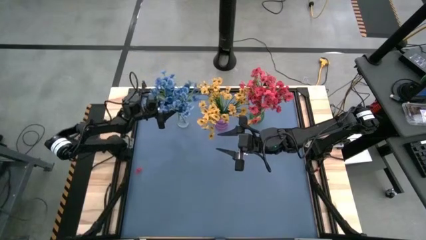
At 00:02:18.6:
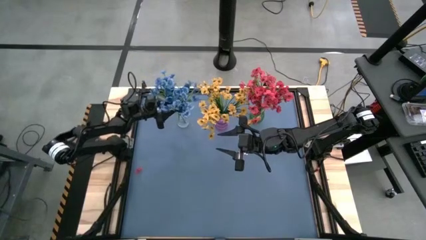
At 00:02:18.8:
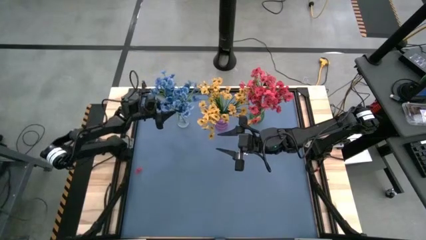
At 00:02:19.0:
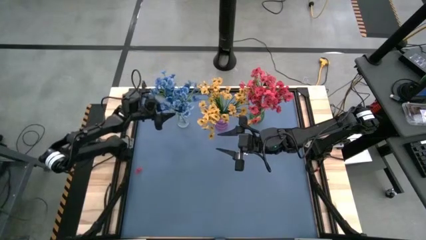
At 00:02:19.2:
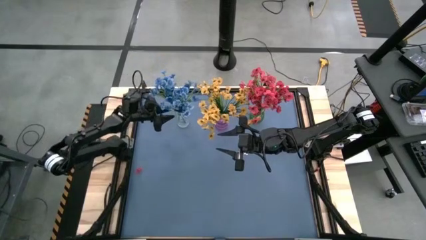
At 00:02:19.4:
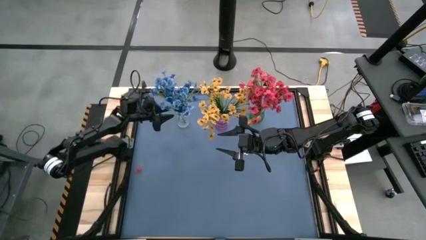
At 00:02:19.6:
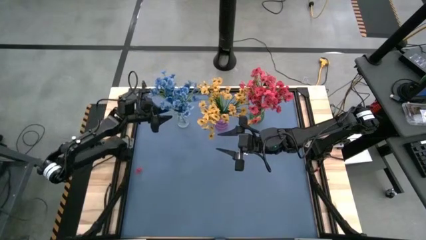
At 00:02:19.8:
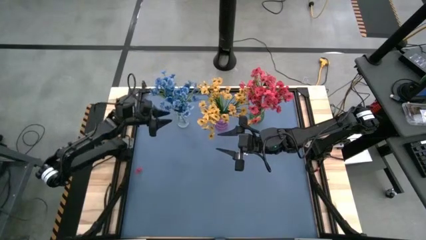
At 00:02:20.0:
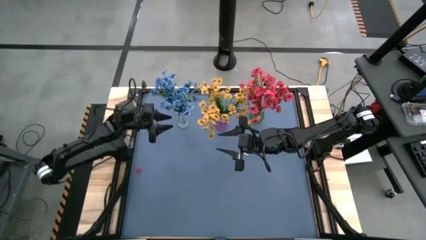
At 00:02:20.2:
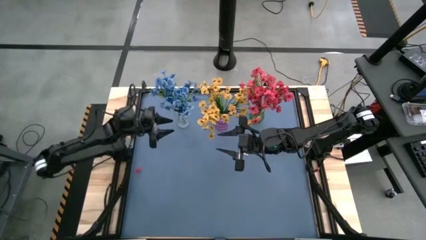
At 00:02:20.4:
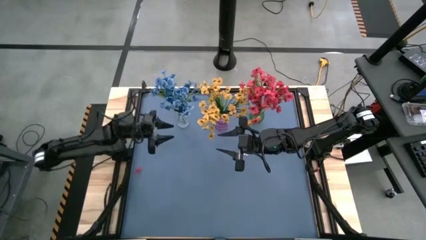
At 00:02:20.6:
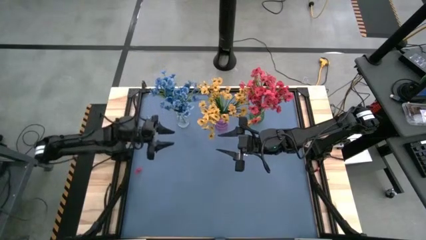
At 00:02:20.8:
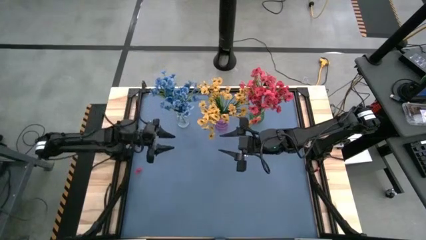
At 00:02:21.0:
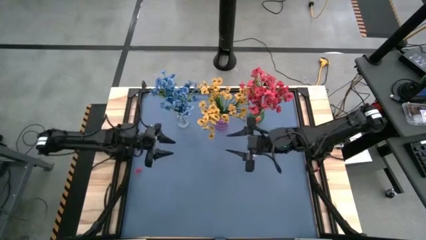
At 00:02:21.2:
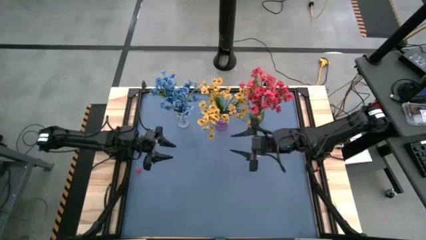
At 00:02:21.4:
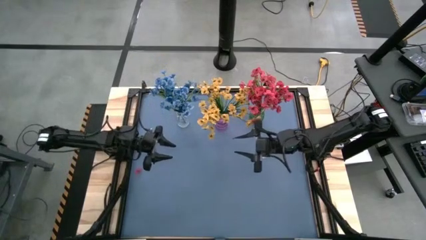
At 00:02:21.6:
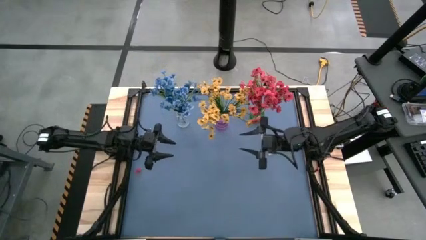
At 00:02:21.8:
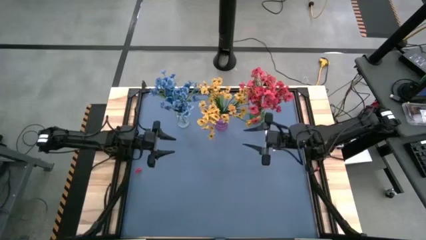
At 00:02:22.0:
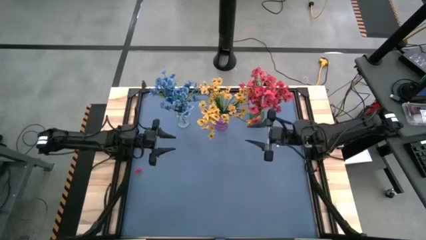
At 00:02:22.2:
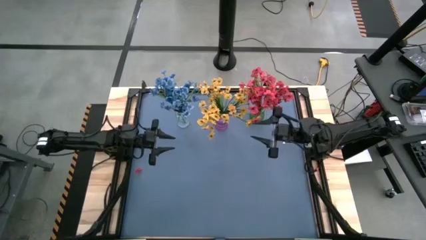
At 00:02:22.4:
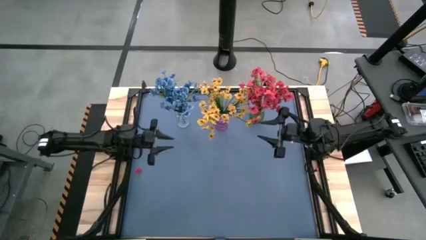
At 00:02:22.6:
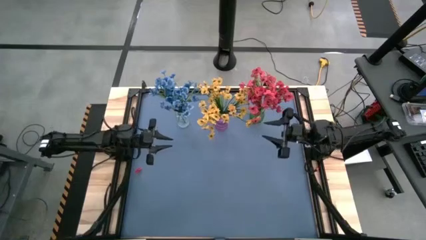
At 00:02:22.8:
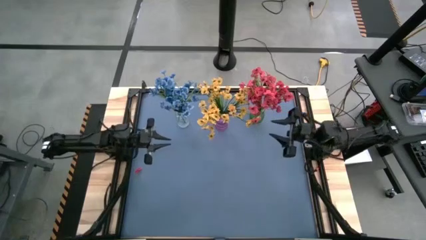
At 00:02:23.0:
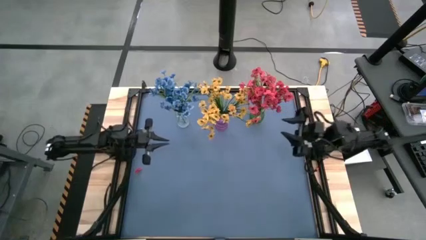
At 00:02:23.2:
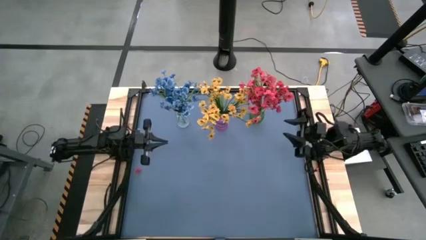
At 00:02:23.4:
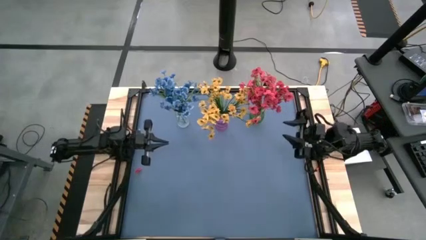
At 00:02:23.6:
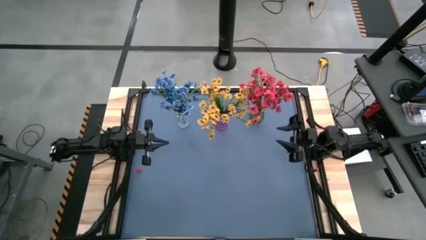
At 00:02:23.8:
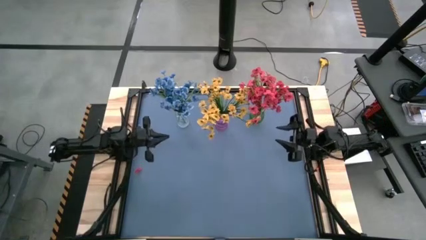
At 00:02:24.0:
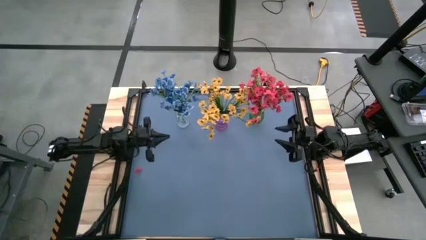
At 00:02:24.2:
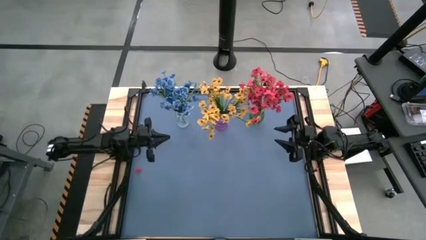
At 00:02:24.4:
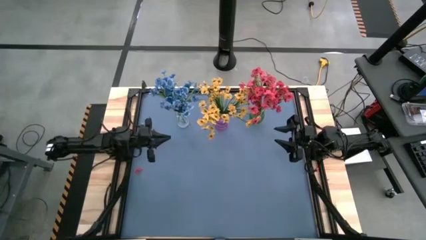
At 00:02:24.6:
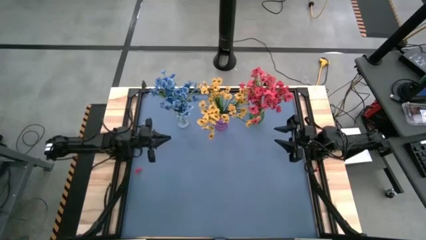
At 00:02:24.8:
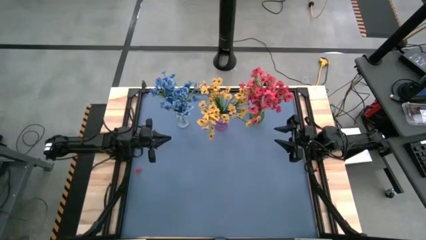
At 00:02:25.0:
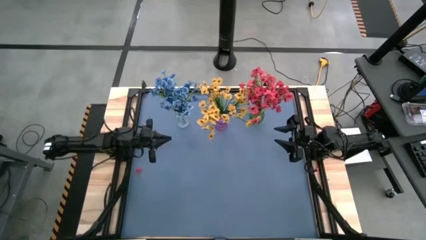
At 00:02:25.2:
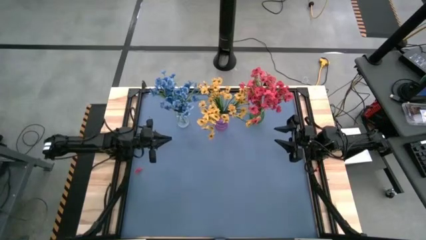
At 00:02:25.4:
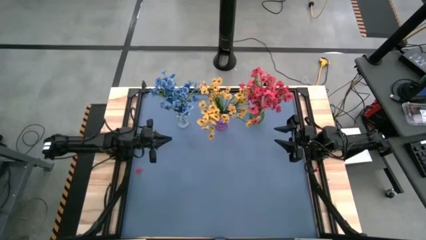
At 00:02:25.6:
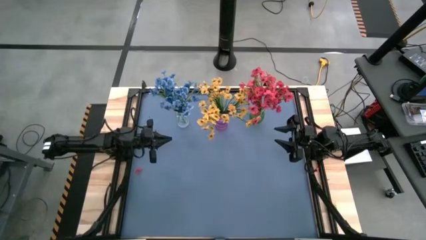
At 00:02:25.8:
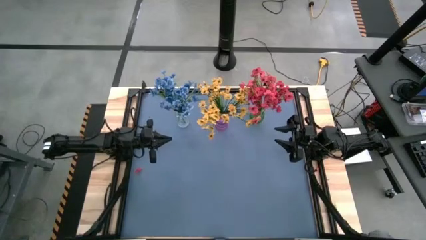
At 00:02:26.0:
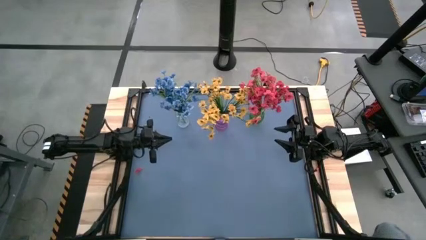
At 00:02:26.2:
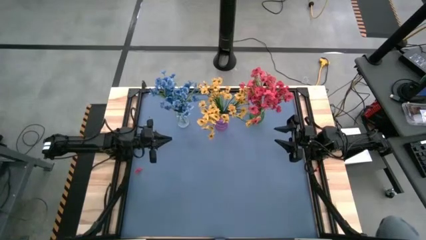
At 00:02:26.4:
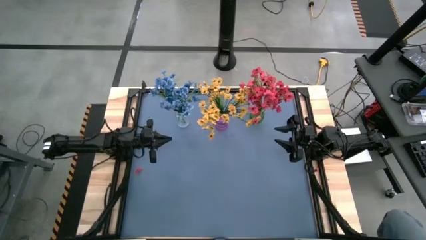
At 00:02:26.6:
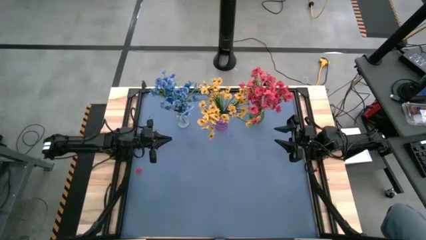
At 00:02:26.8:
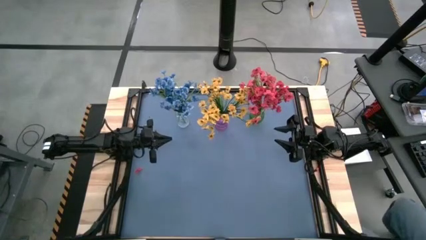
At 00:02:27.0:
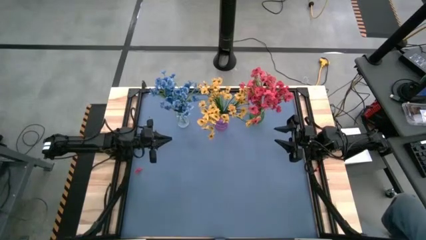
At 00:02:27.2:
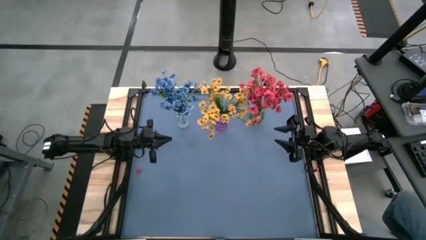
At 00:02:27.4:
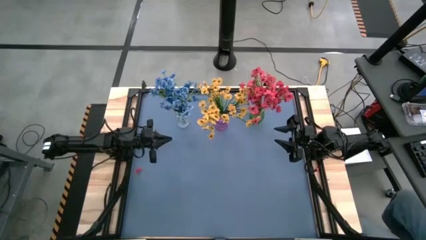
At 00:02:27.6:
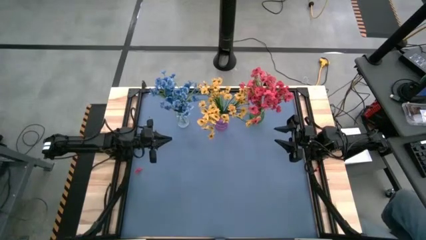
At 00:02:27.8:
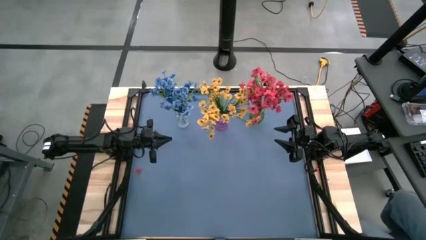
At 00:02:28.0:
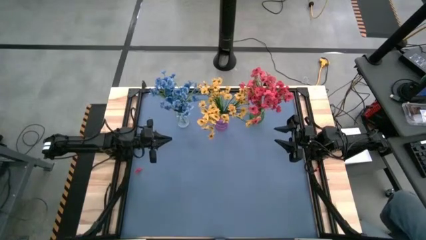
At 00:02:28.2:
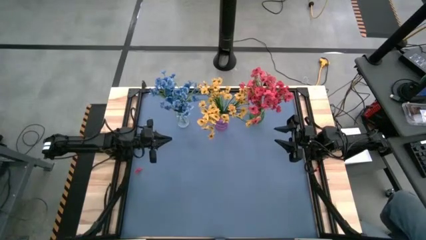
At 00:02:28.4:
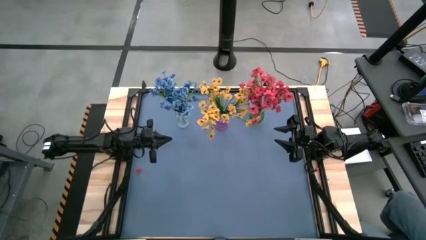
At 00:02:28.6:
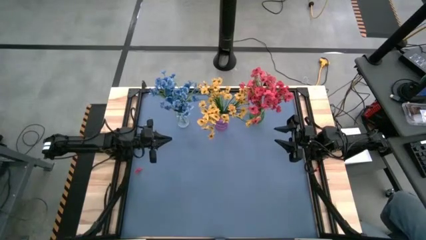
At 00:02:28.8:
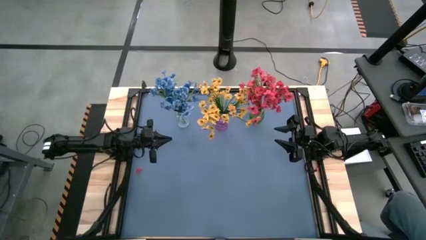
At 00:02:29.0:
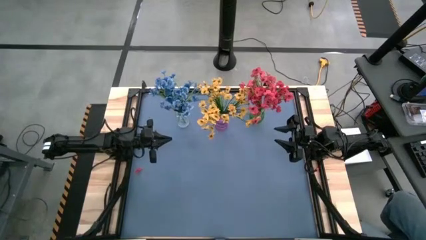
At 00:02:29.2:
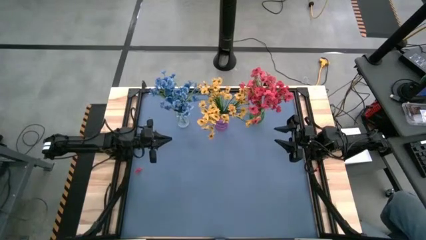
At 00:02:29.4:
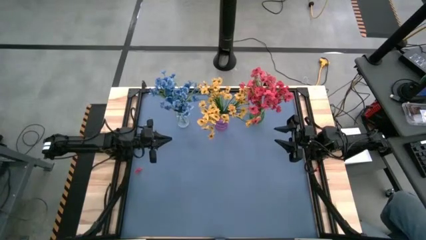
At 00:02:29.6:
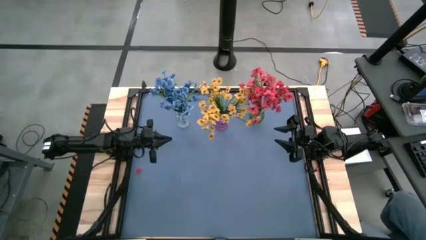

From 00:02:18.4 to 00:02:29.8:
Task: Sort flowers into vase by color
Return to Home Position

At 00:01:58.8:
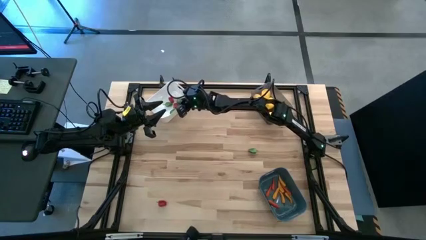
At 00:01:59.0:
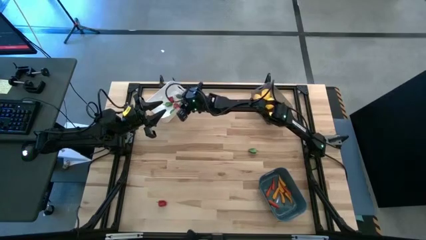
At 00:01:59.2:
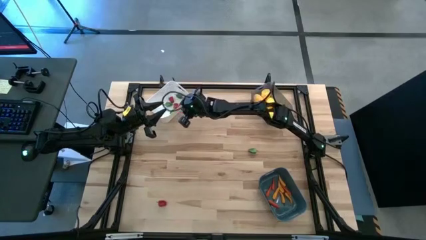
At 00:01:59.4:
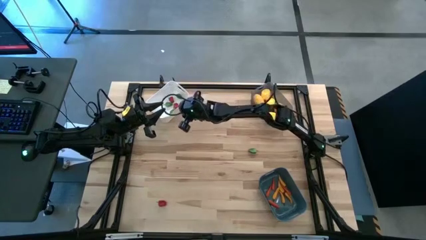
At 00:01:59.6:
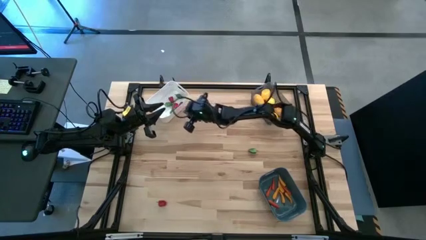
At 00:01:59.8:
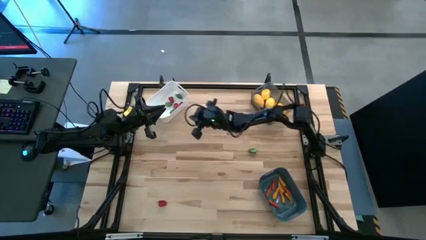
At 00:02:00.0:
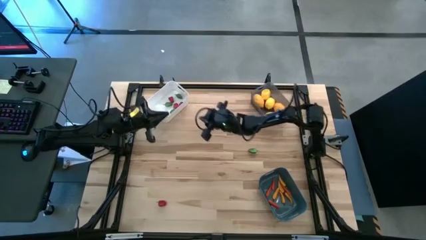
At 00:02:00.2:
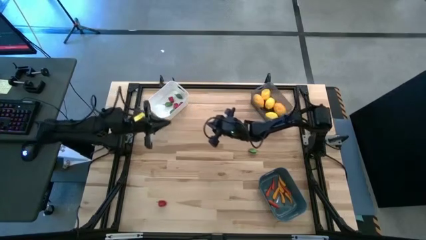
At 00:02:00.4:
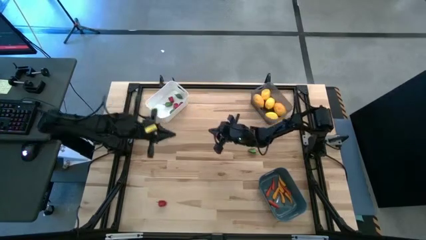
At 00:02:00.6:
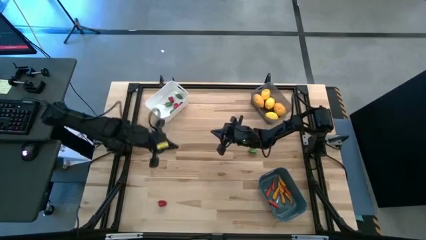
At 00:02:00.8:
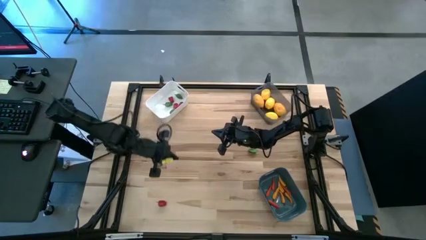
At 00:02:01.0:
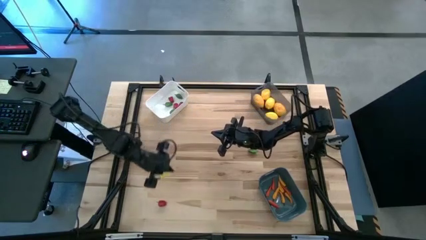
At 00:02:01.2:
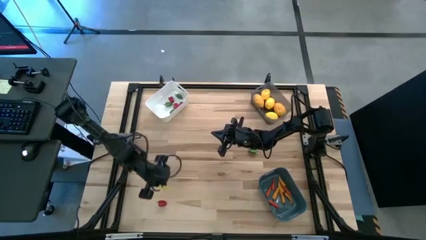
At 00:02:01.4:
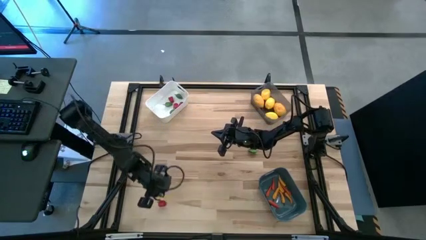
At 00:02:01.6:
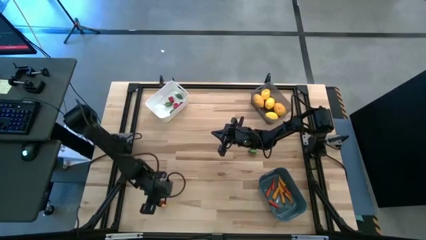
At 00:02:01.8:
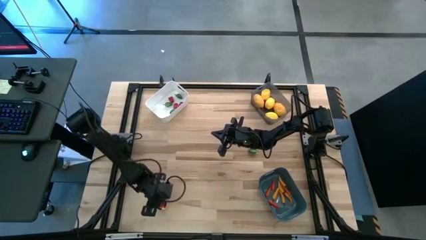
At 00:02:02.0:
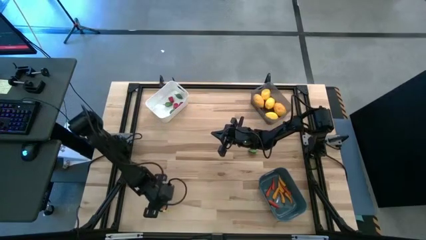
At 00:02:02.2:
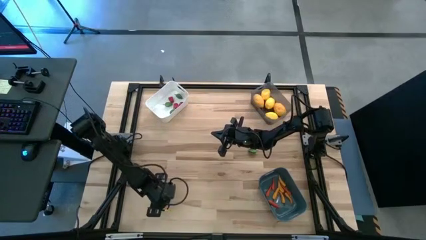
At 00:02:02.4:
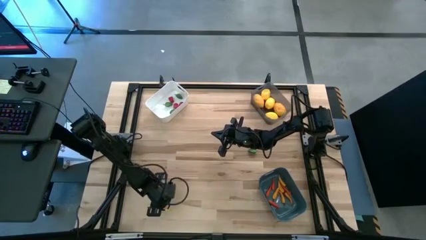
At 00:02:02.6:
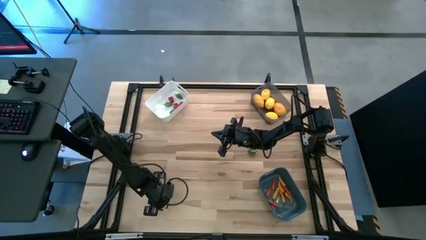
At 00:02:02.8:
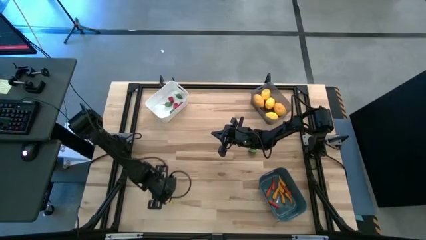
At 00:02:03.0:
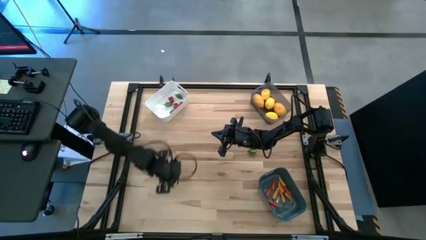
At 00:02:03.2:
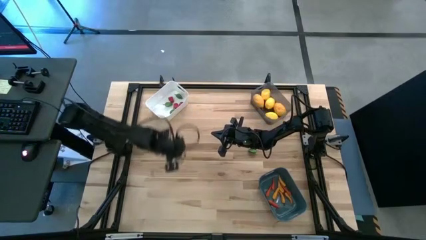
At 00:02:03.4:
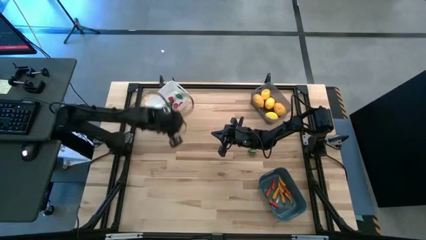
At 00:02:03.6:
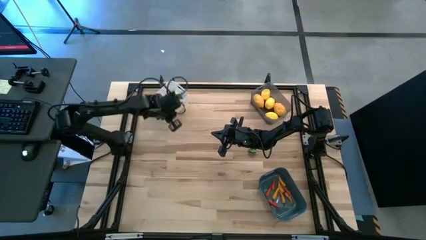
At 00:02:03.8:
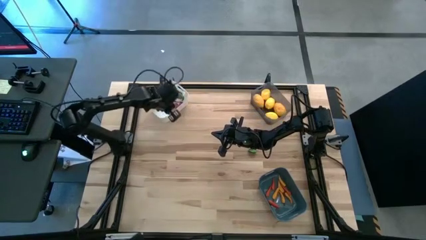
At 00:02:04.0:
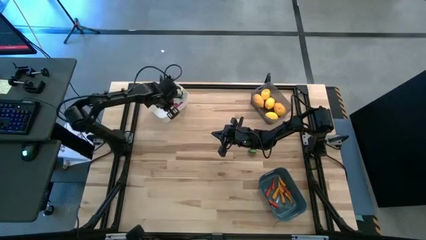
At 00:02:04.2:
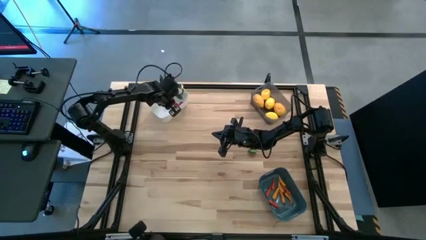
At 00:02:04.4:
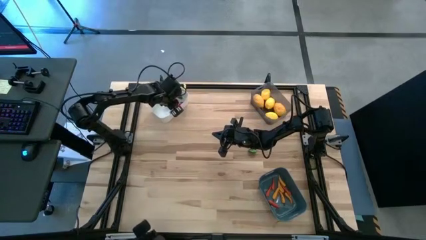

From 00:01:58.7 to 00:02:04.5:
Task: Sort produce into baskets
Put the red chili pepper into the white bin
